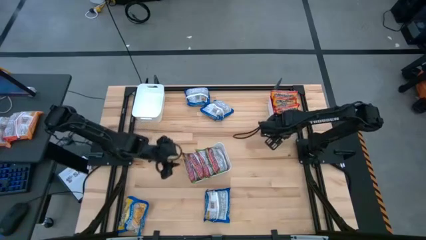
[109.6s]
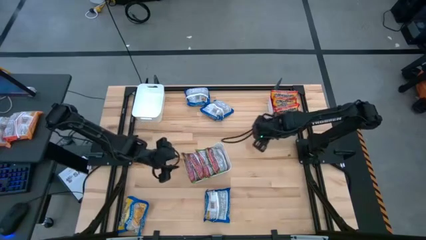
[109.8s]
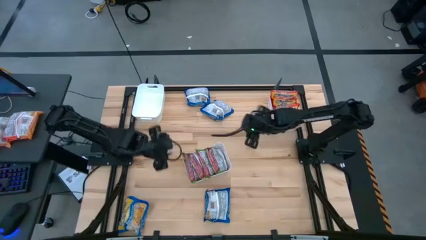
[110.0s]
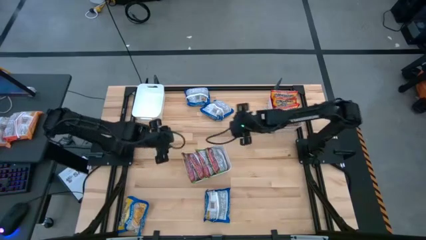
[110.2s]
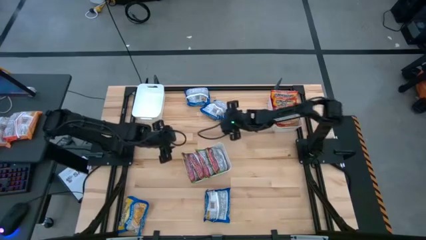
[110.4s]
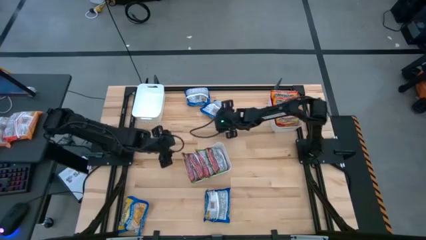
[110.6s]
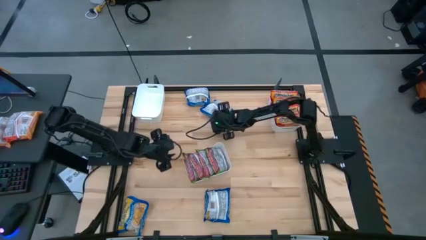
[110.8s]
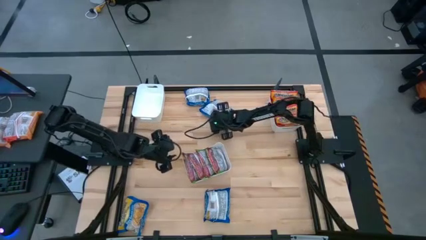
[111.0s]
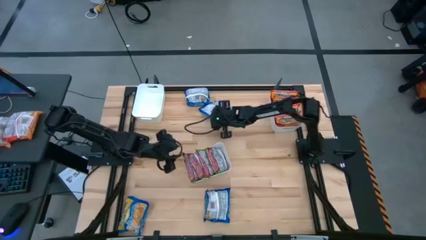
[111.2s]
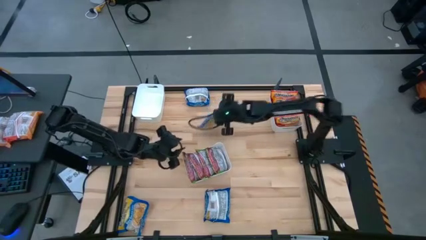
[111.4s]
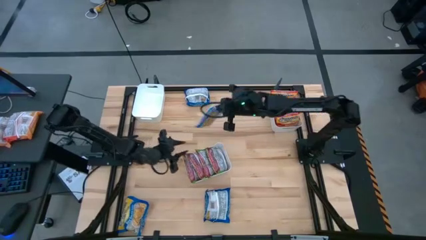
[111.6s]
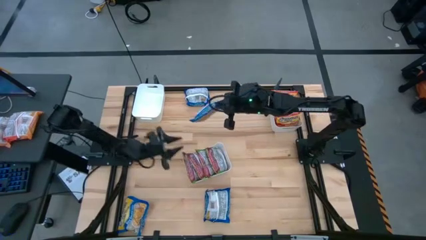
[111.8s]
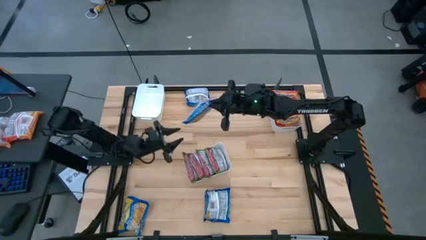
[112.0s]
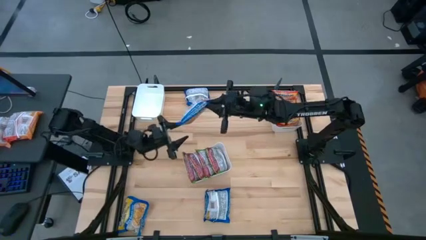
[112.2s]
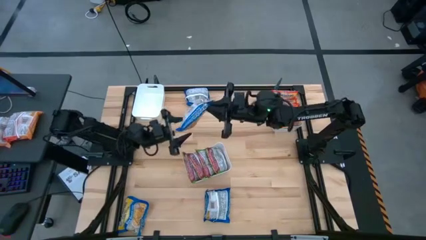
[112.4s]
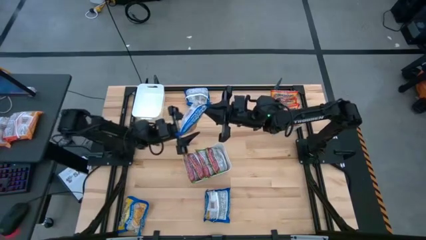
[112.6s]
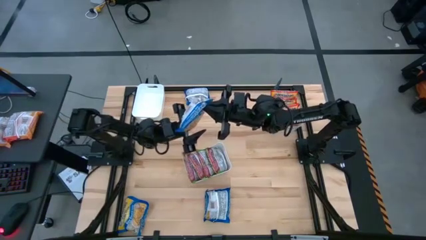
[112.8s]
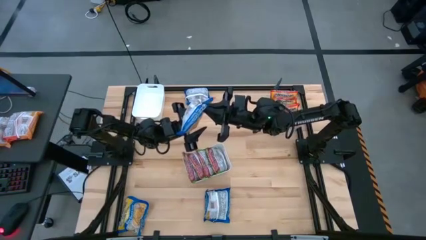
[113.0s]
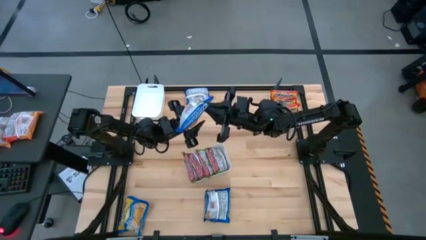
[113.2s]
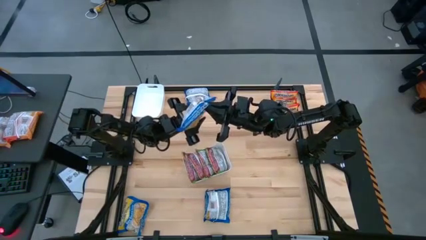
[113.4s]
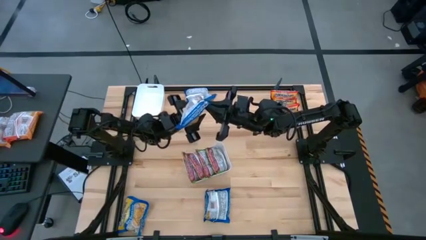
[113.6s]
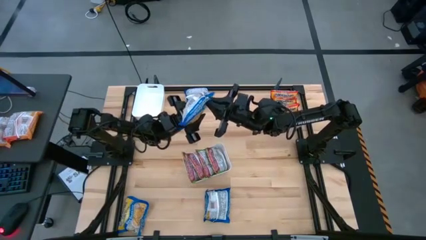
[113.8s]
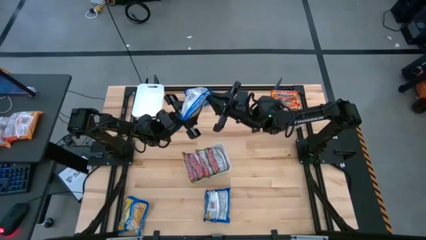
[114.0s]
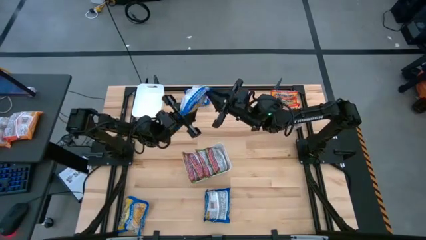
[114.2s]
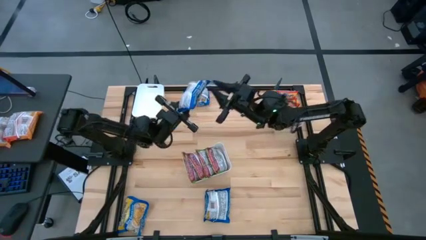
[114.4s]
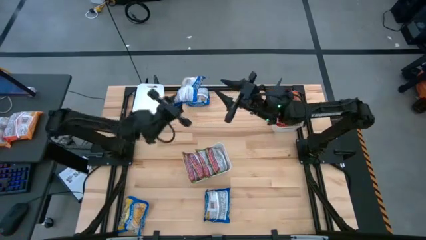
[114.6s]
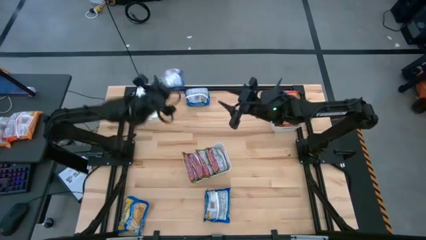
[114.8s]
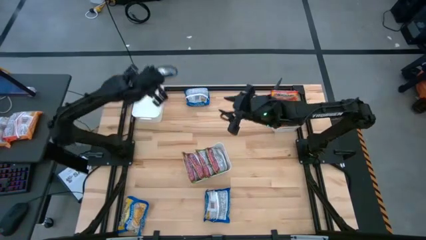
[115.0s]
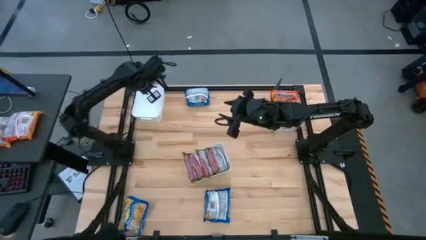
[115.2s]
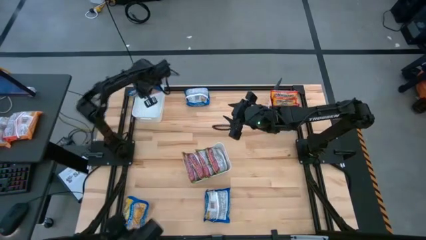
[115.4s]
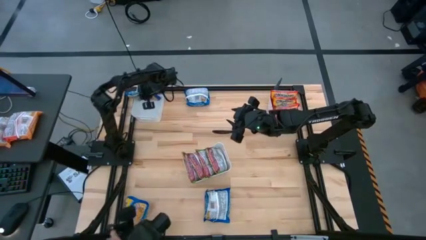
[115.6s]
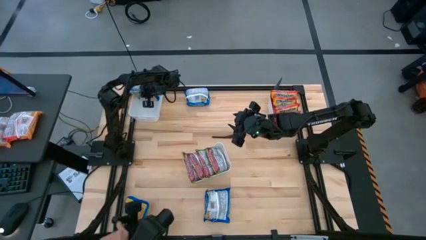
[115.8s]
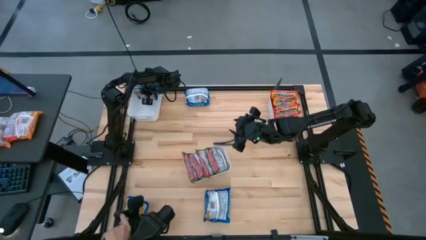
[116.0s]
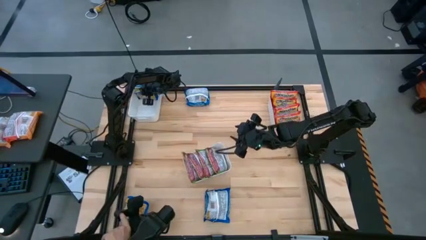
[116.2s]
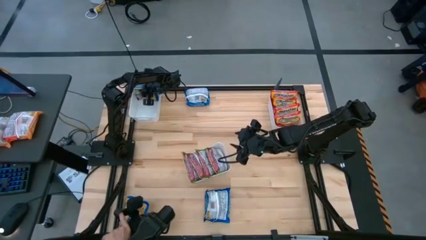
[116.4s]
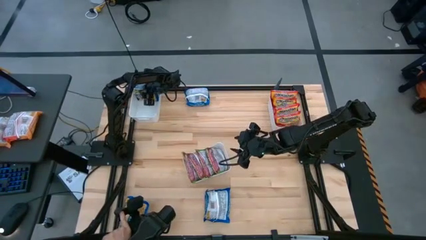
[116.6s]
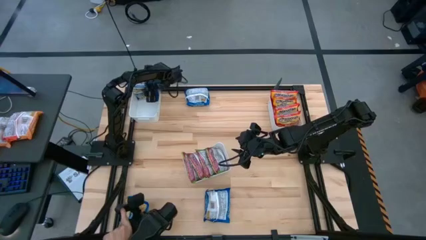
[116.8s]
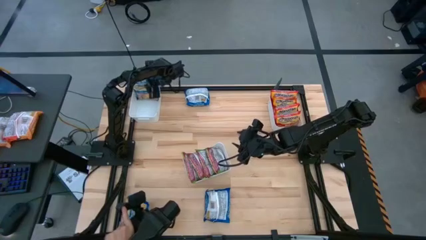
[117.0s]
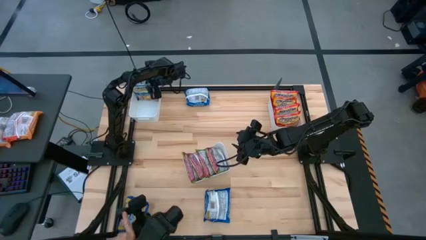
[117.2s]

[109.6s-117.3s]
Task: Sort Maruchan noodles
Put the blue noodle pack into the top left white bin

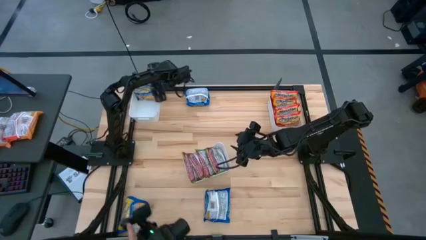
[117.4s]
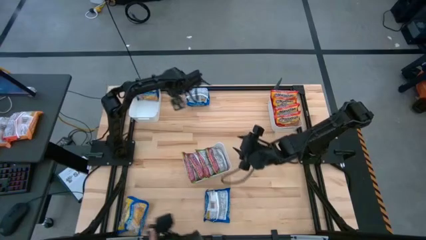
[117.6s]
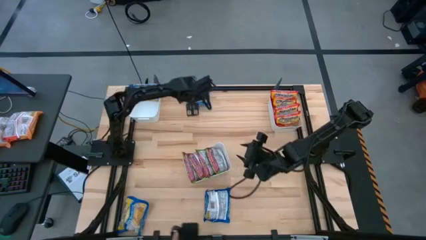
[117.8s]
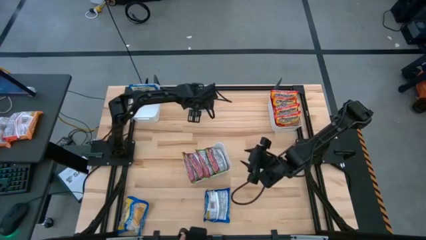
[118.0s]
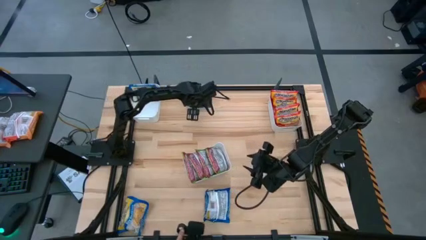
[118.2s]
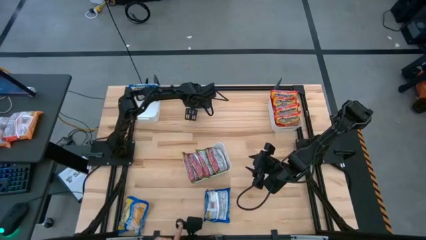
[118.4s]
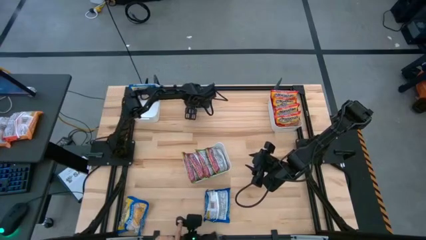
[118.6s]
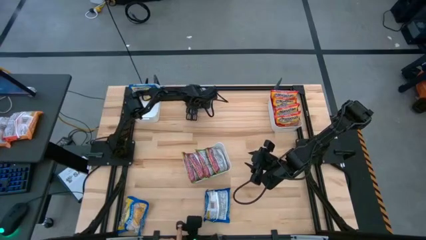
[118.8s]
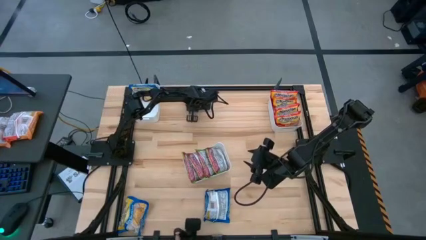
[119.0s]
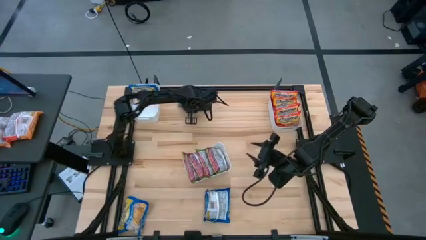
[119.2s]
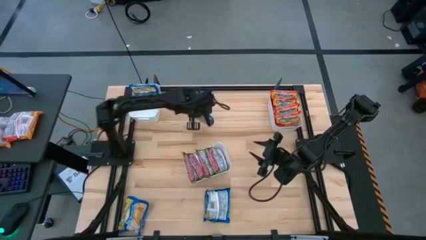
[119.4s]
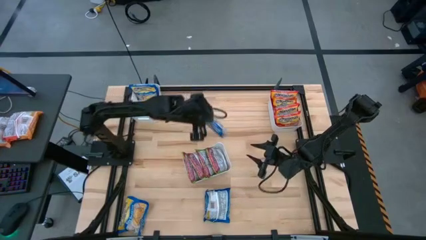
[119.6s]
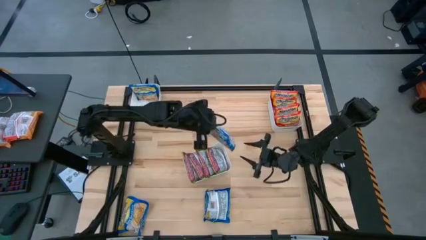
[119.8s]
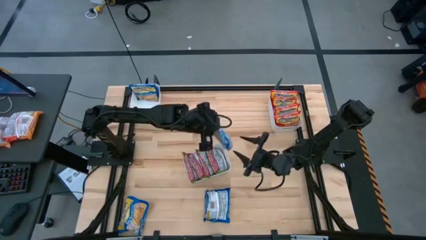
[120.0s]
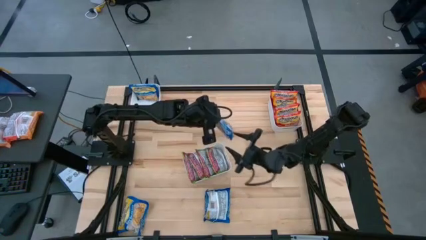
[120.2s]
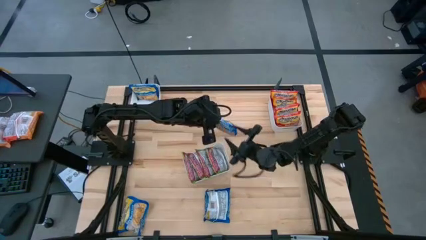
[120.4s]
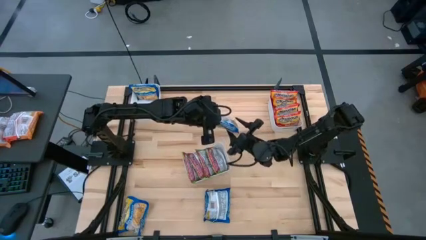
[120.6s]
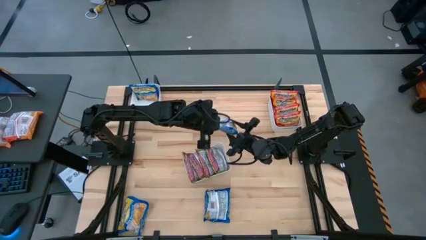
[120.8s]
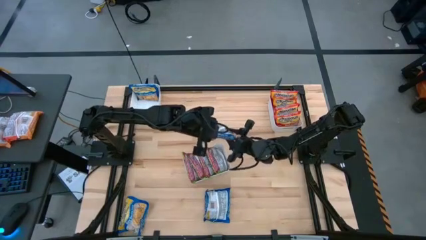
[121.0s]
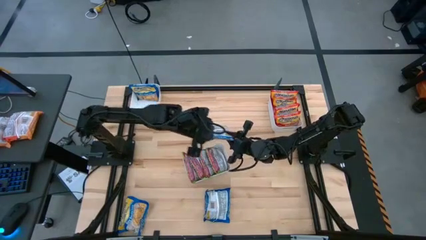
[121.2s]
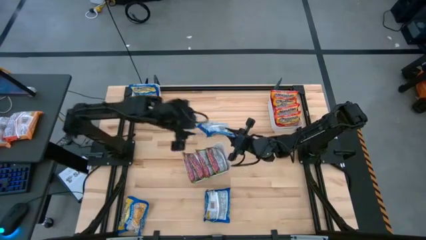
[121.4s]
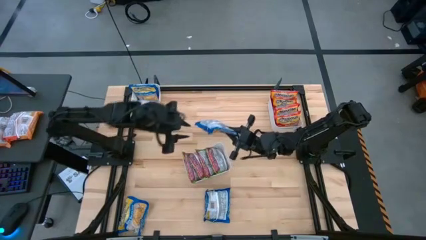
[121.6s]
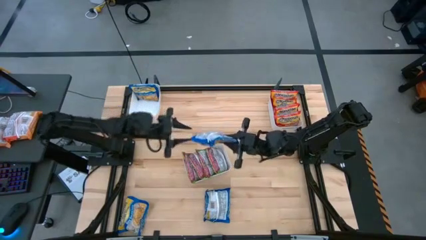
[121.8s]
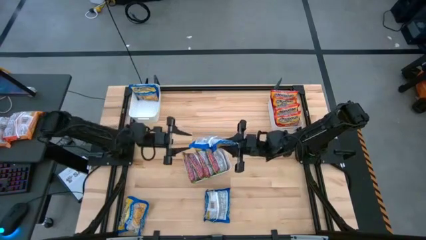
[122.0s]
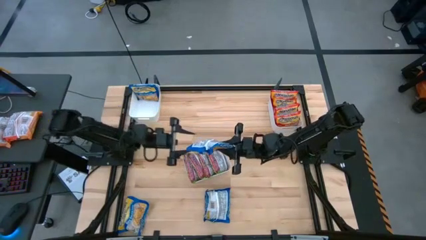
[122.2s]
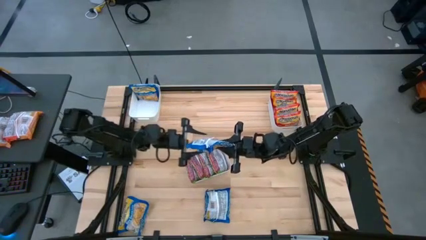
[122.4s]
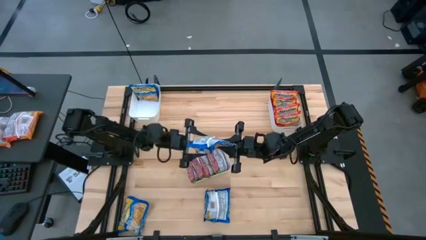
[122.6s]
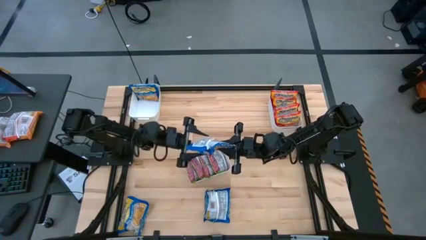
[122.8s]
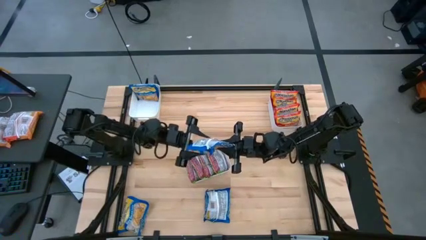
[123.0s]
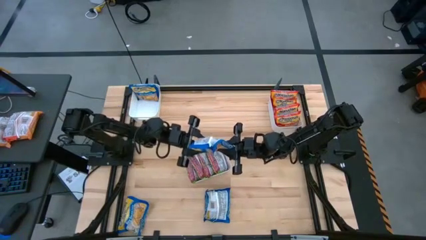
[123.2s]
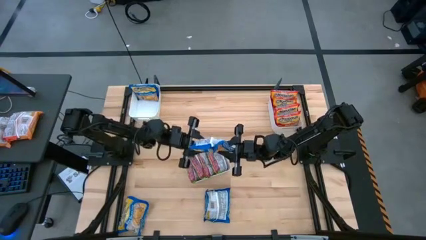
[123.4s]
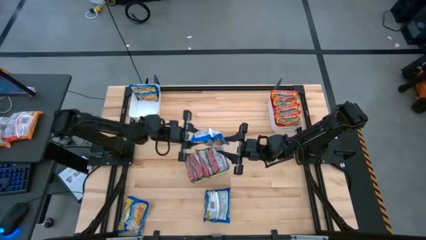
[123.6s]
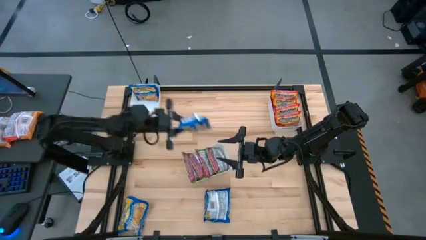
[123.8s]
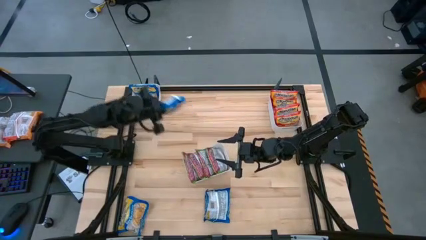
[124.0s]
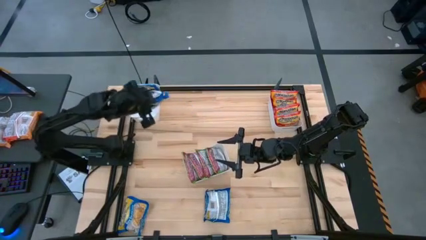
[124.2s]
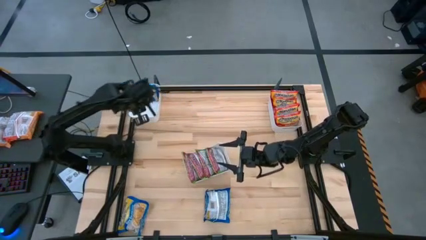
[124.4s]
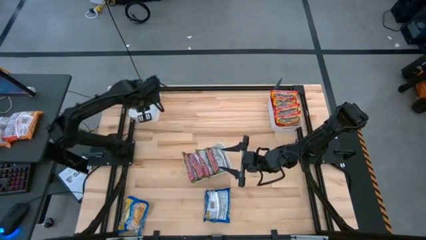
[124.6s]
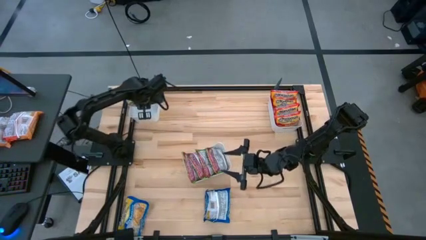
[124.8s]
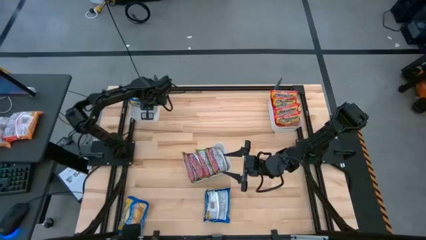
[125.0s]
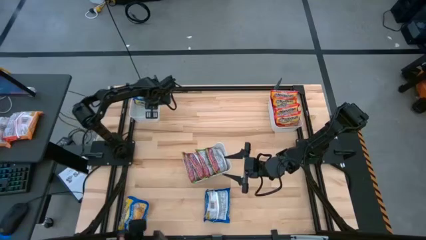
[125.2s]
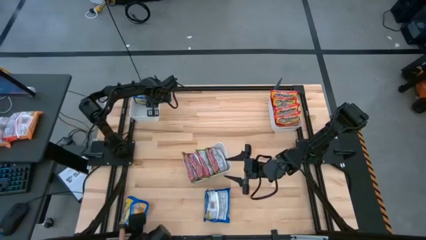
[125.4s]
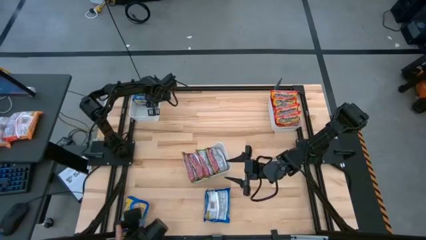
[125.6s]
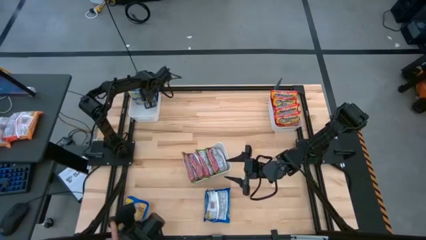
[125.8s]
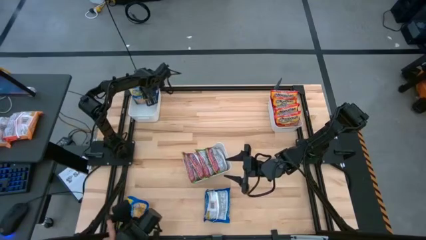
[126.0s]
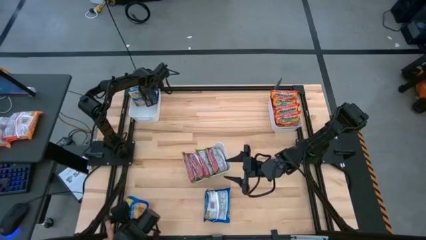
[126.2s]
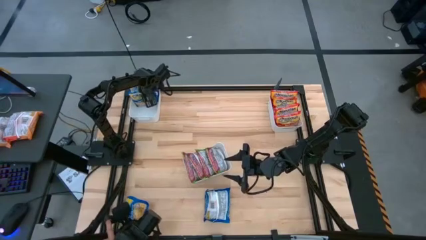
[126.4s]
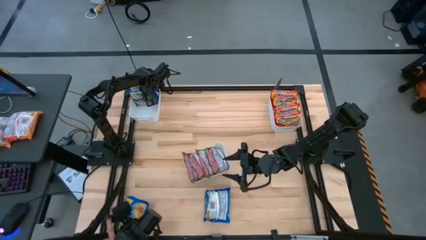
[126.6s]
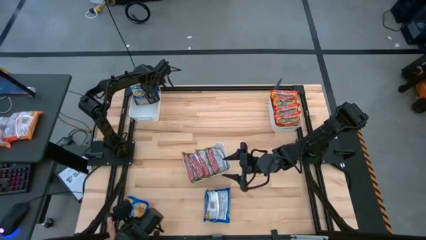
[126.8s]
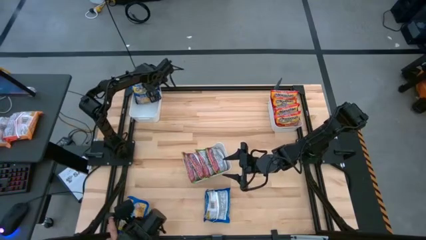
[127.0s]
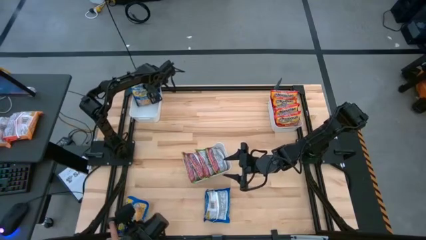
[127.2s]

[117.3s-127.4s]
Put the blue noodle pack into the top left white bin
